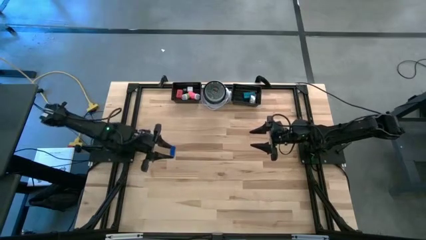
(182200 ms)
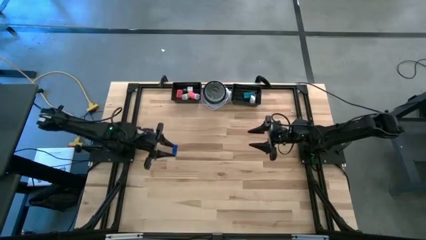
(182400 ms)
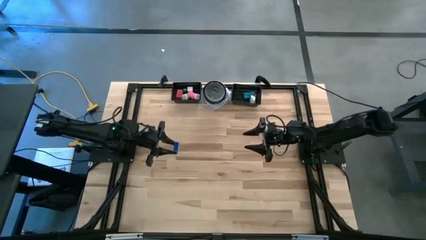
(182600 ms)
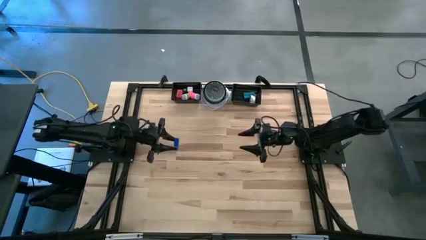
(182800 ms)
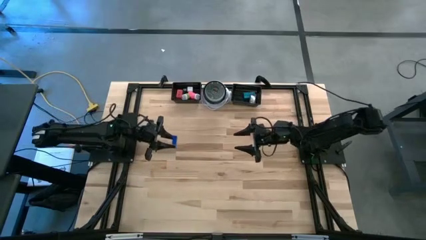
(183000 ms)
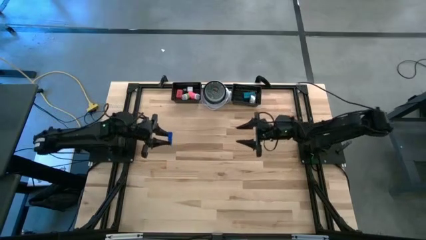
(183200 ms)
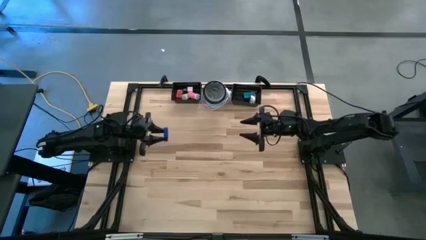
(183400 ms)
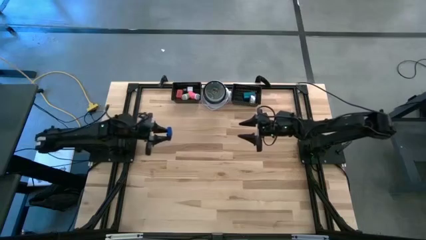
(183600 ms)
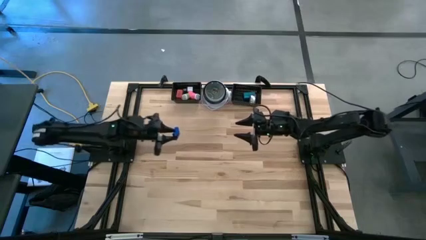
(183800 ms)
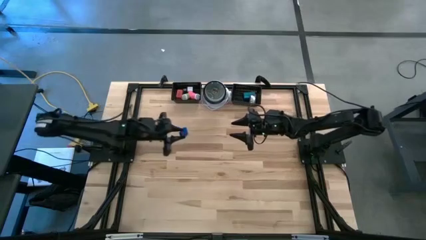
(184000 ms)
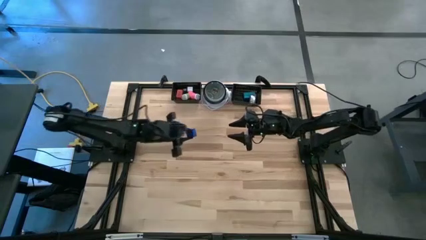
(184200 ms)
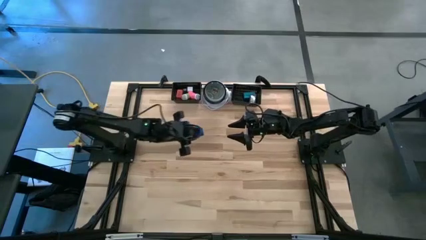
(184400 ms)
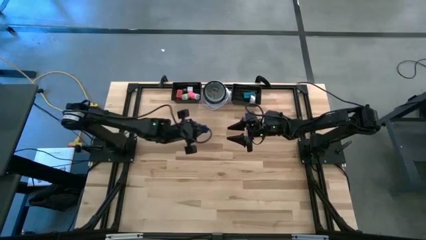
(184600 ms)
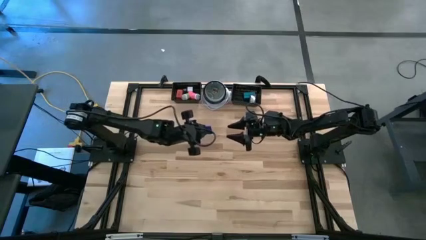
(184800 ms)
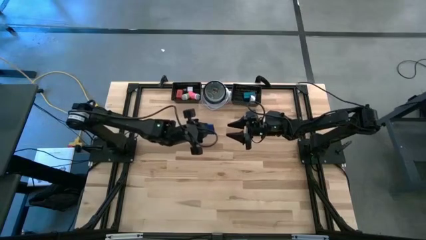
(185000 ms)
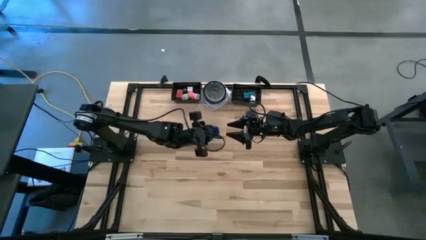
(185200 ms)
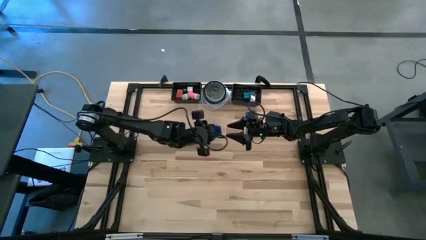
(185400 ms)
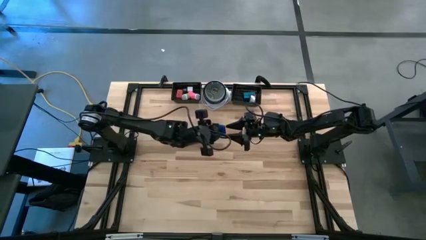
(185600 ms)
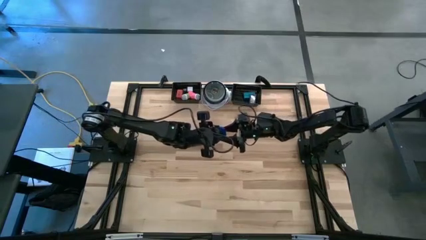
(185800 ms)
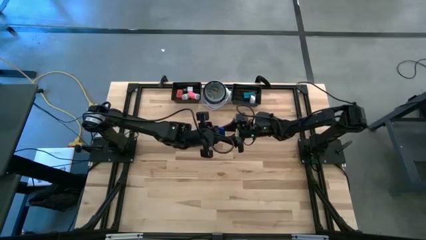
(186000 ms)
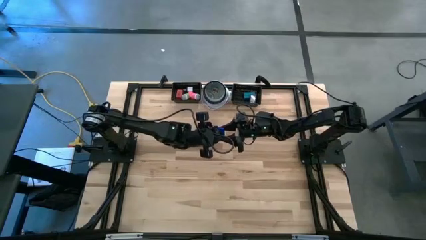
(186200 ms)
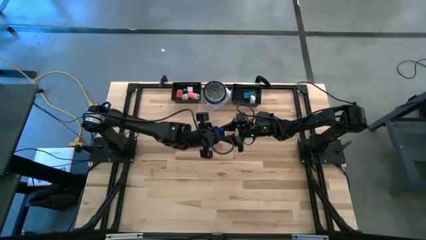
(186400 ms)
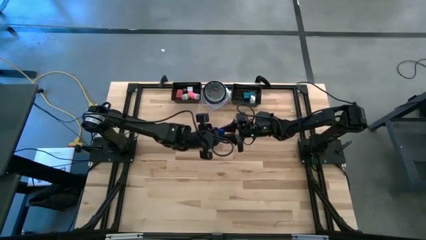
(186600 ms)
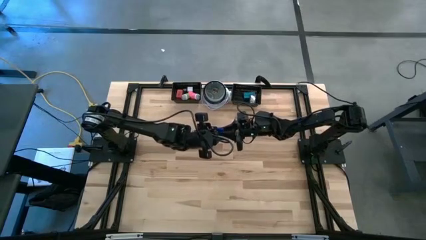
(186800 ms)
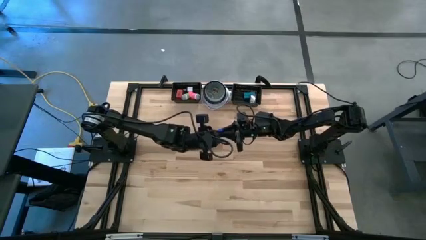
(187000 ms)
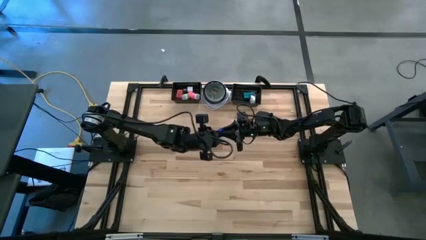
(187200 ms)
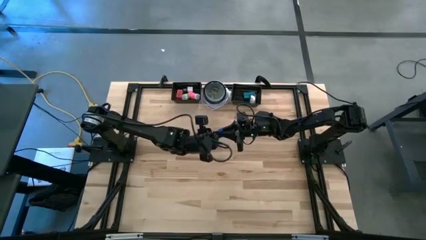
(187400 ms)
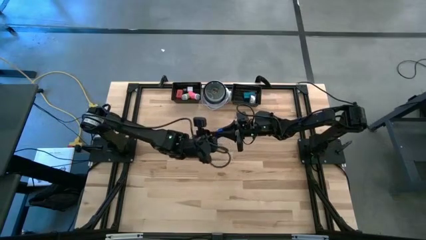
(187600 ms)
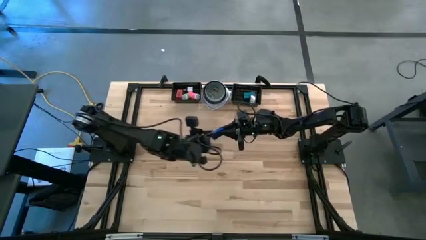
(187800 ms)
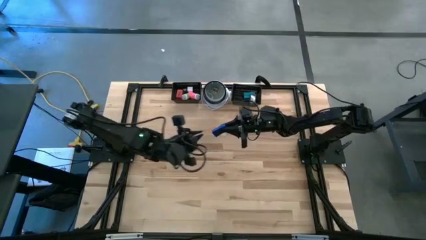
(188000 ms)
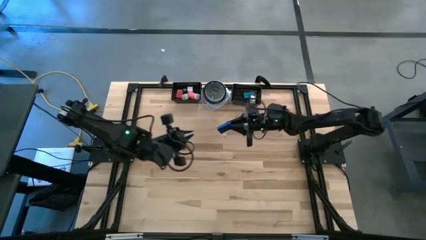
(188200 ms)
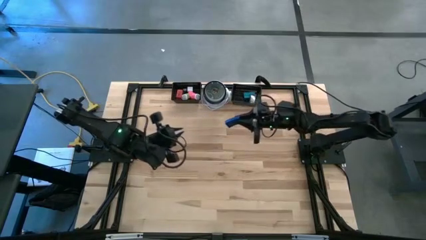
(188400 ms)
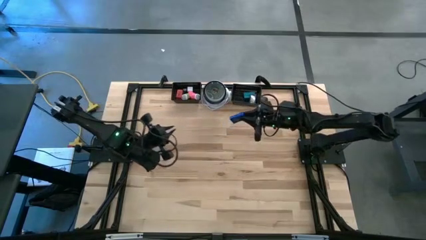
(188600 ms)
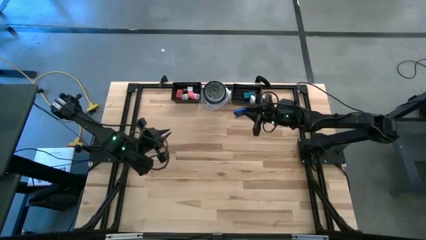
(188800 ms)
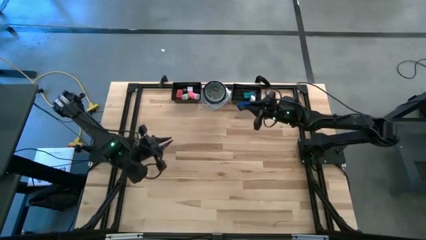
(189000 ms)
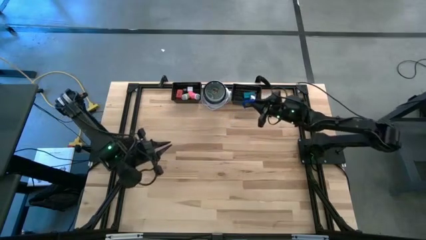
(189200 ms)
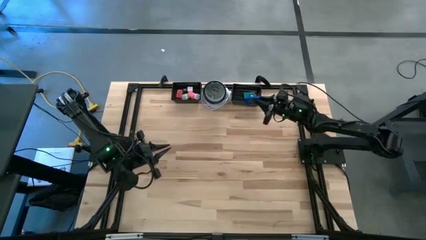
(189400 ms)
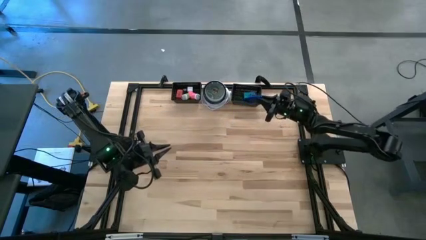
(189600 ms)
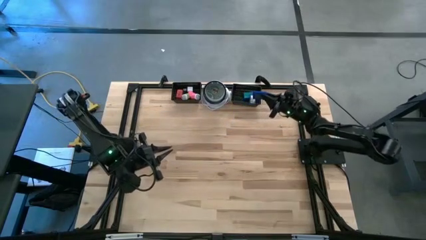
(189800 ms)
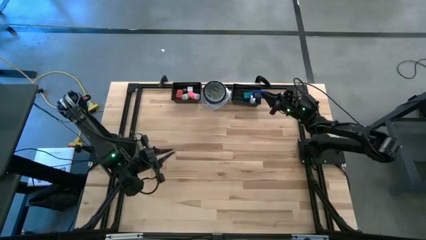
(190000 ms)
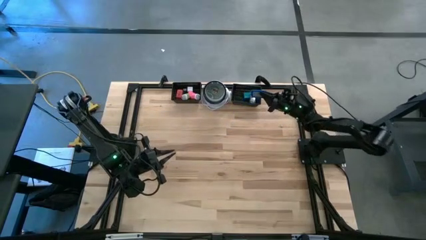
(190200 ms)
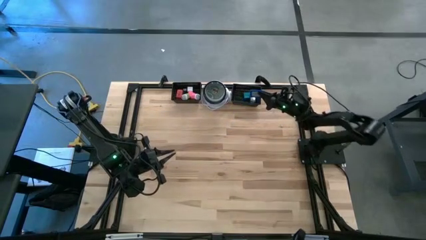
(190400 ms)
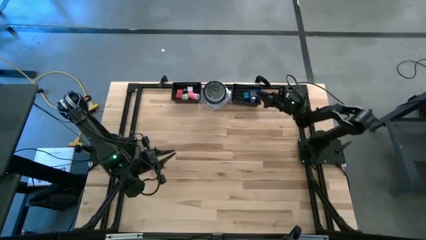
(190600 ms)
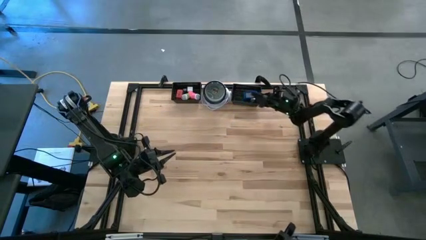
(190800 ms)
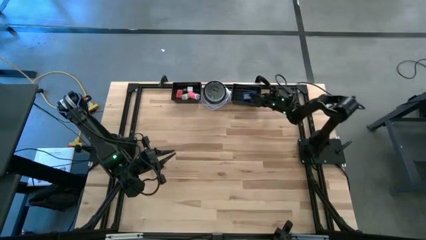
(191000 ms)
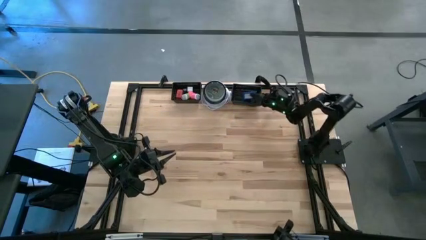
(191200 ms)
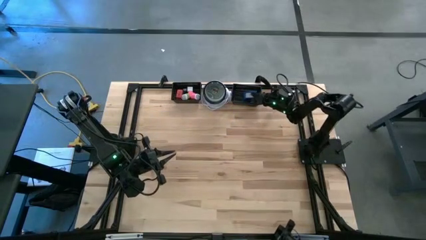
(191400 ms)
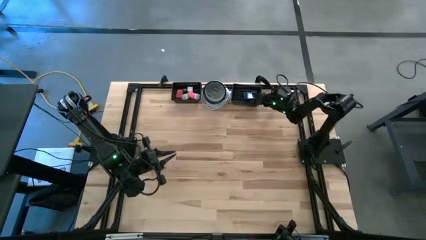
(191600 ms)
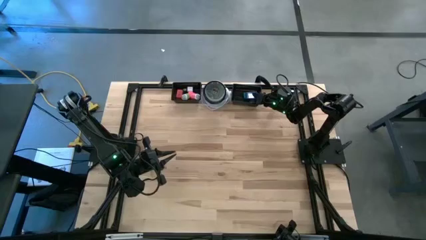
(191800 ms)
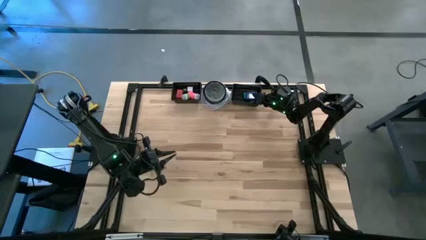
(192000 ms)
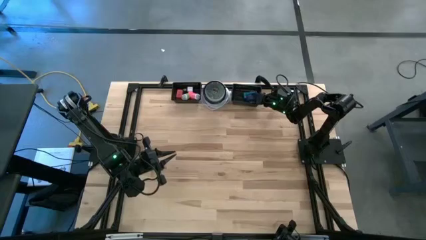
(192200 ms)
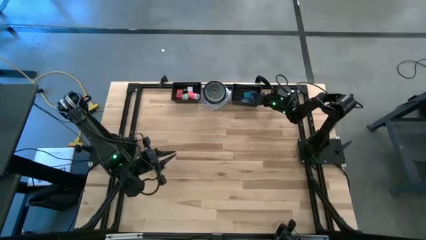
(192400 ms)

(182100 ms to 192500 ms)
Task: Pick & Place Office items
Put the blue digital clock into the right black basket
